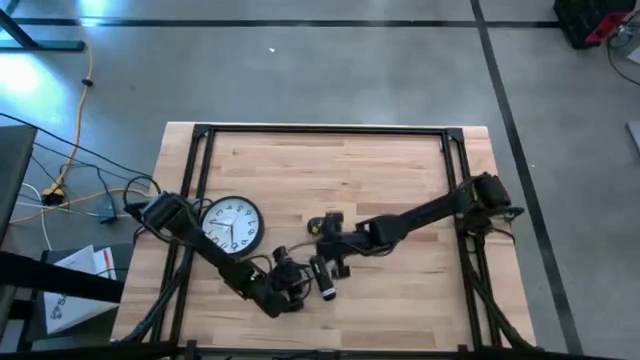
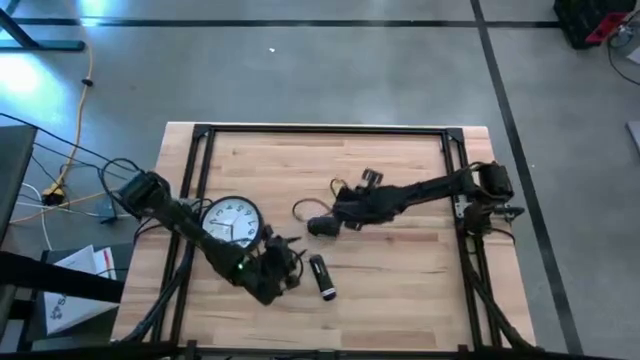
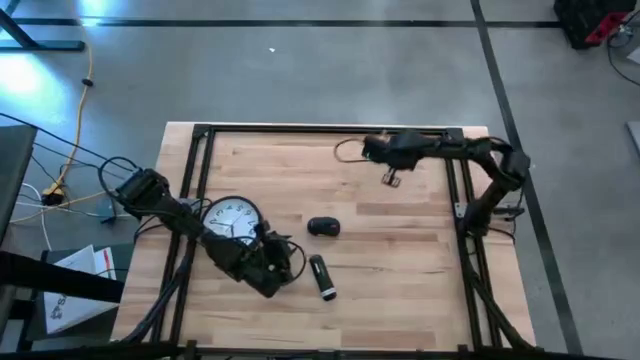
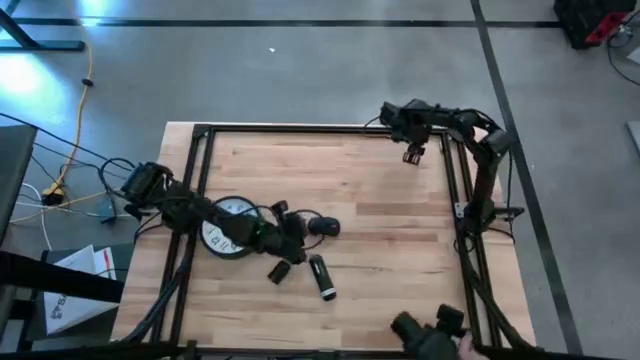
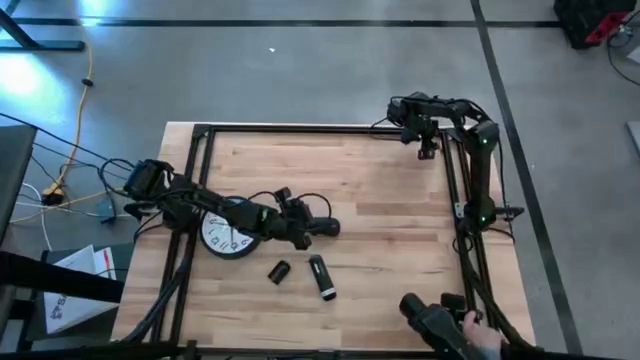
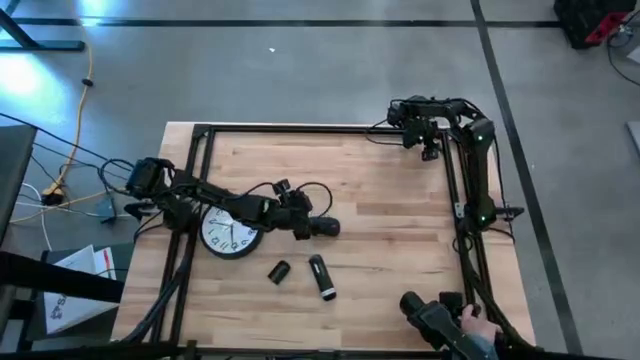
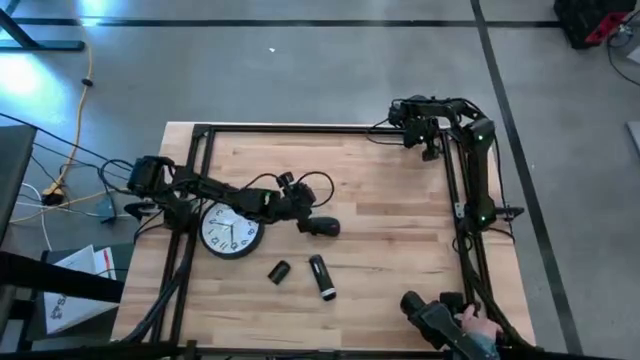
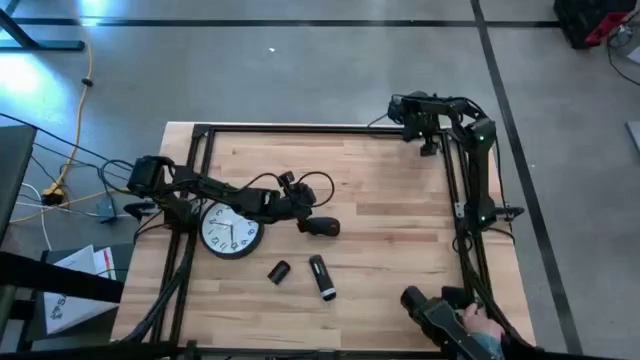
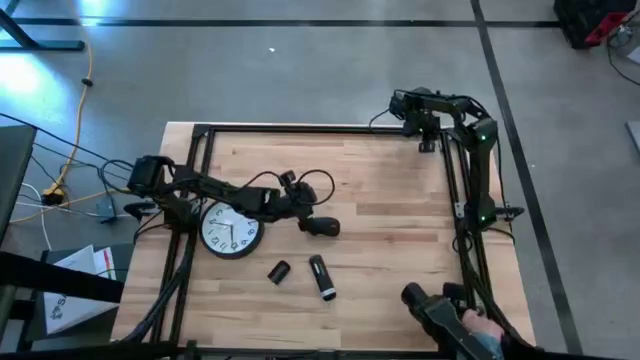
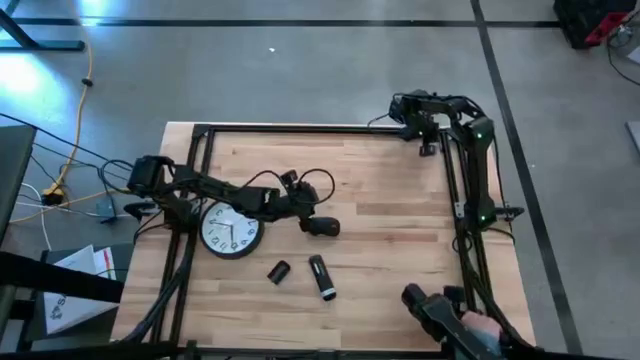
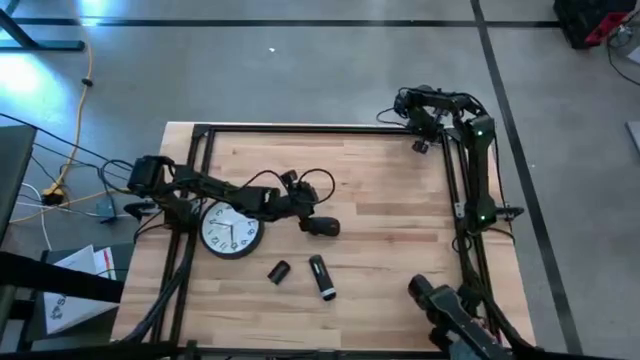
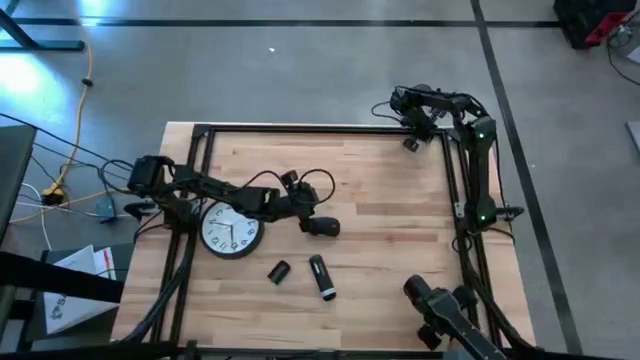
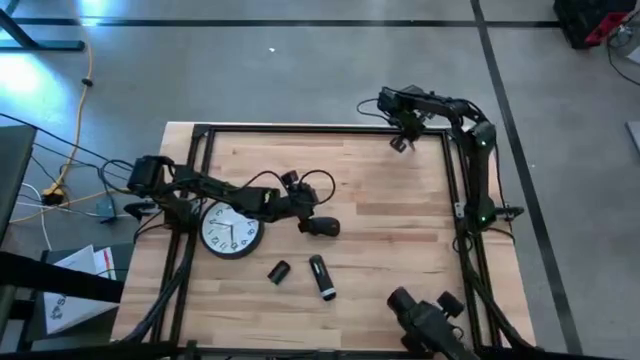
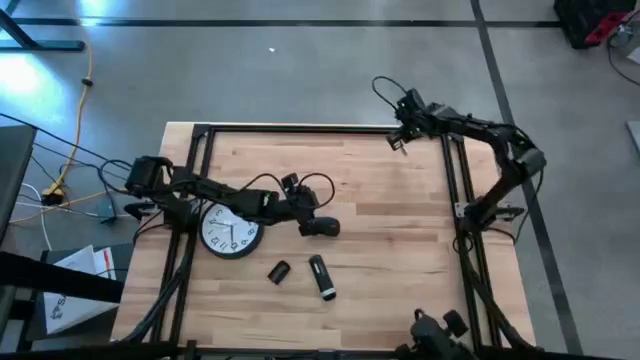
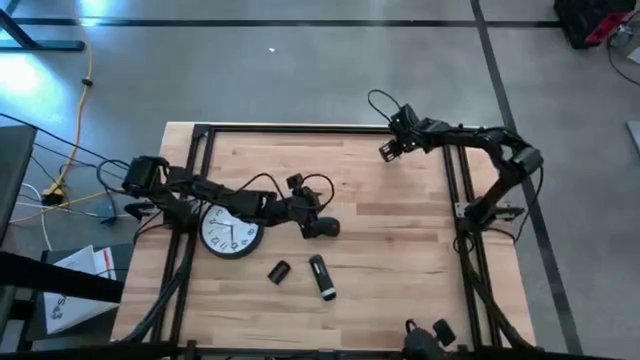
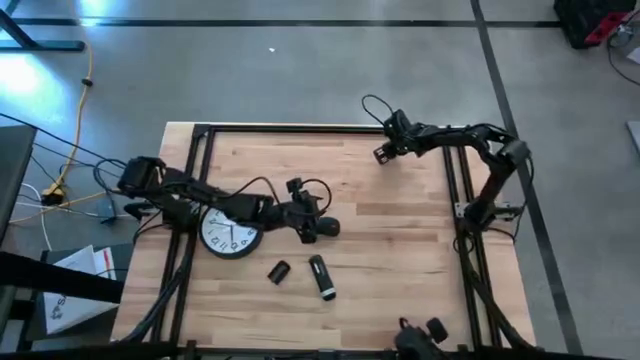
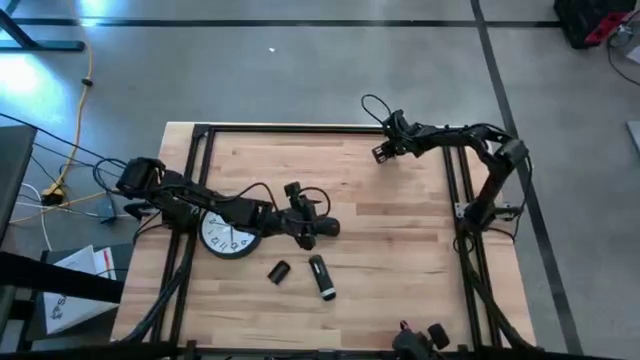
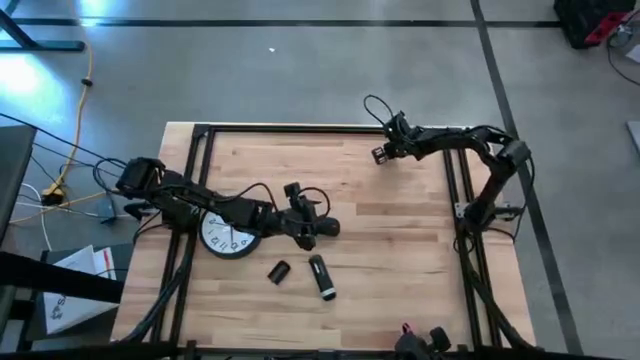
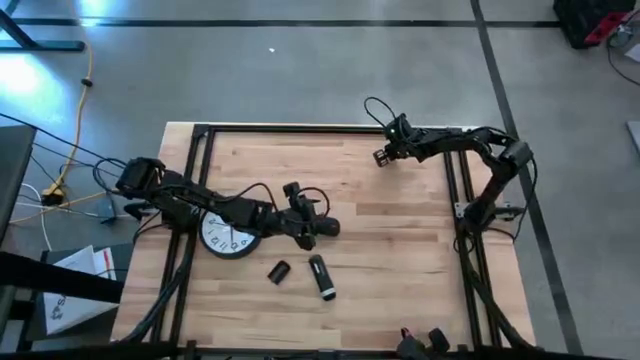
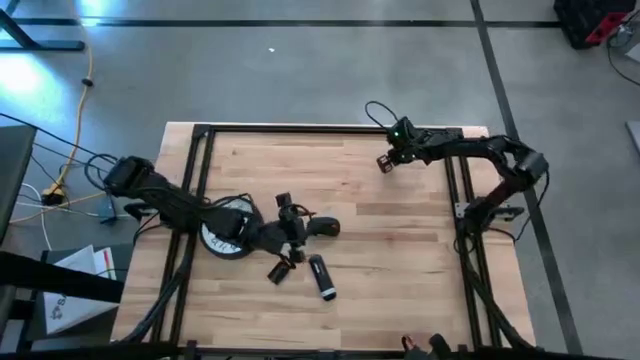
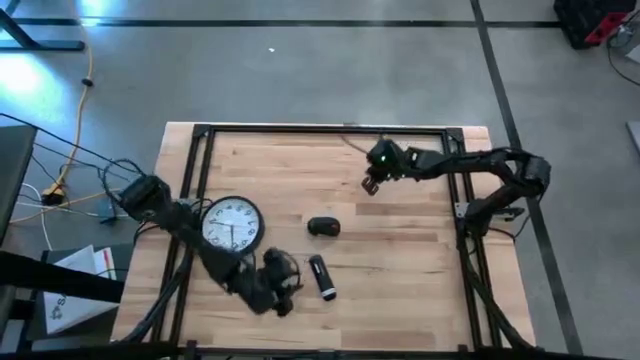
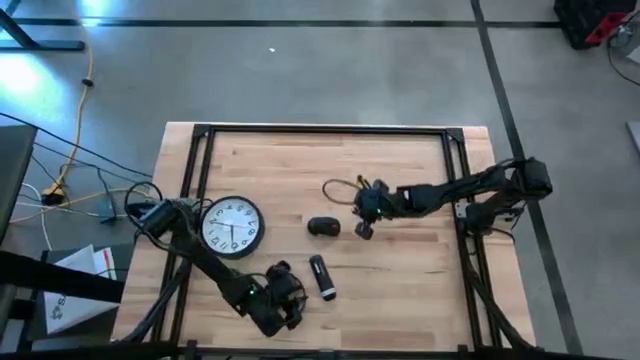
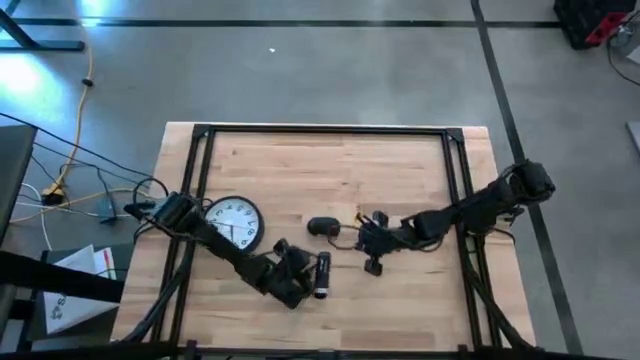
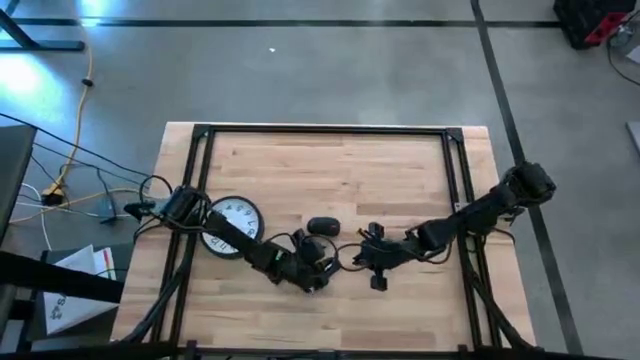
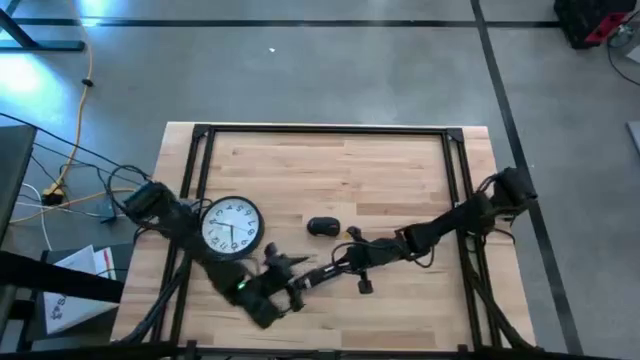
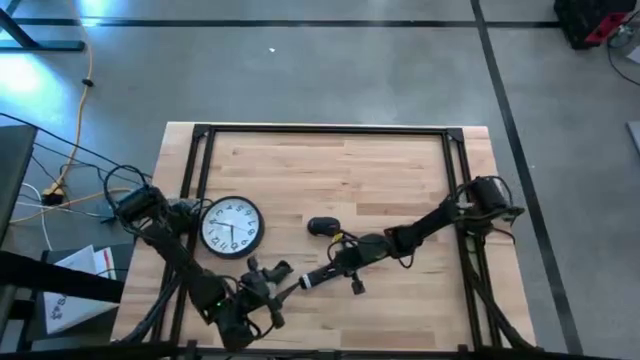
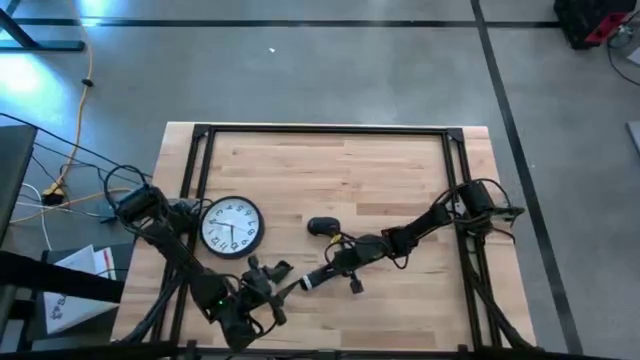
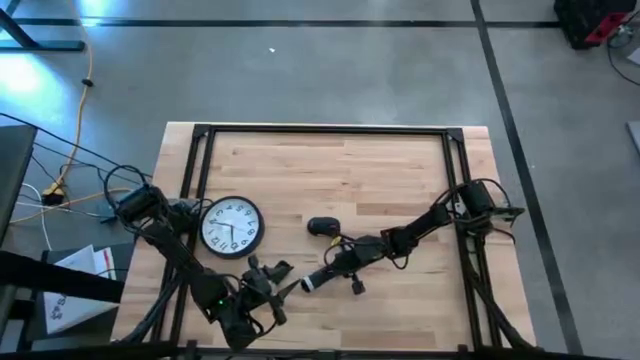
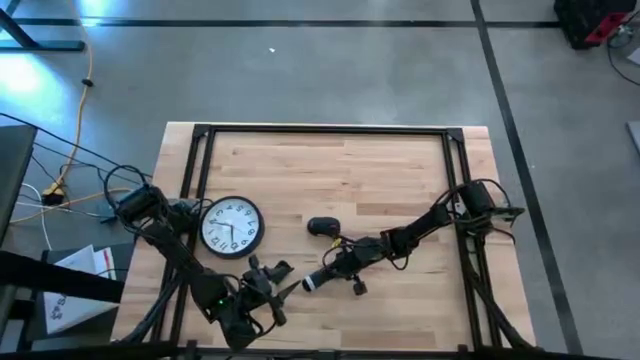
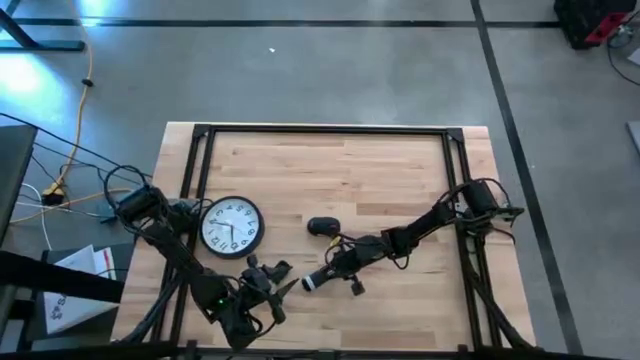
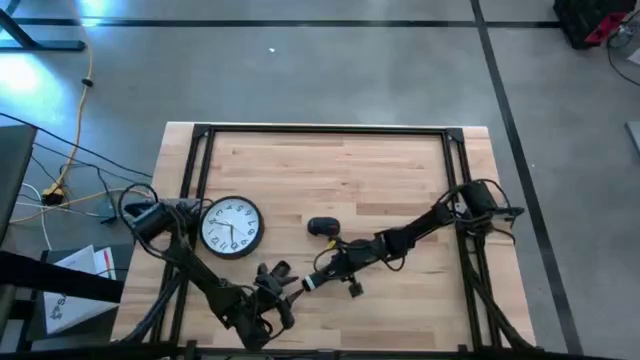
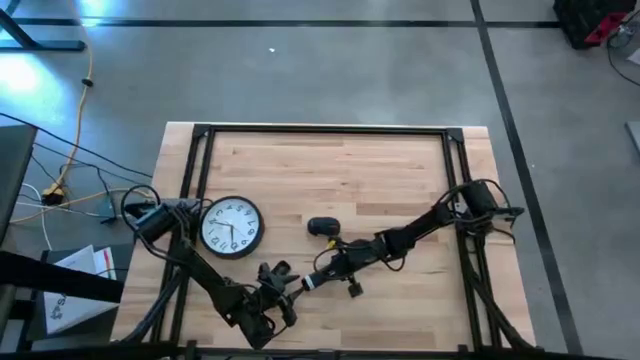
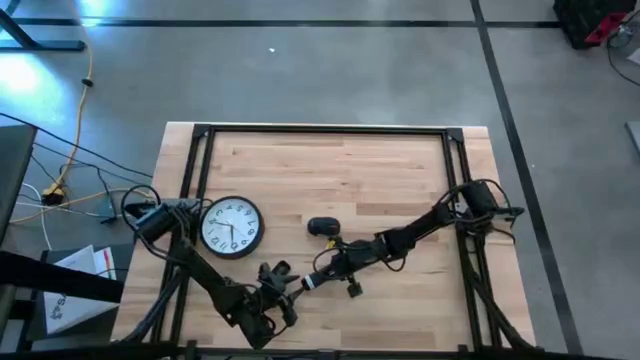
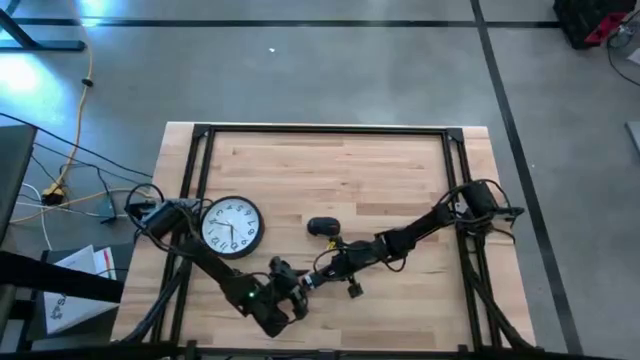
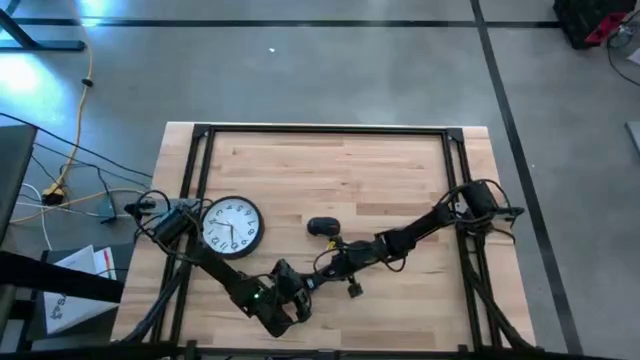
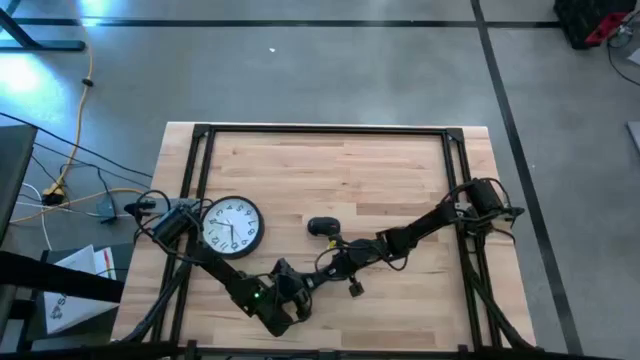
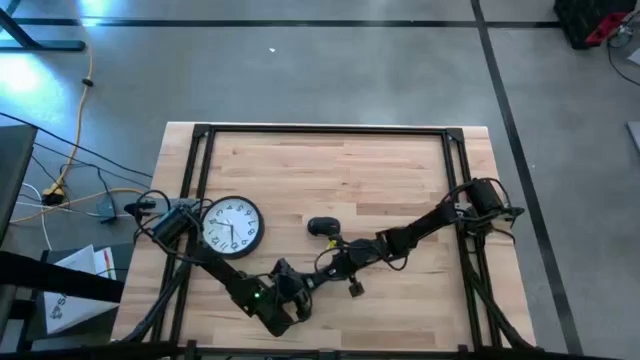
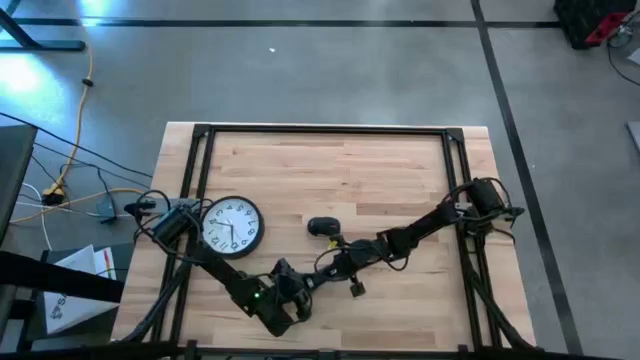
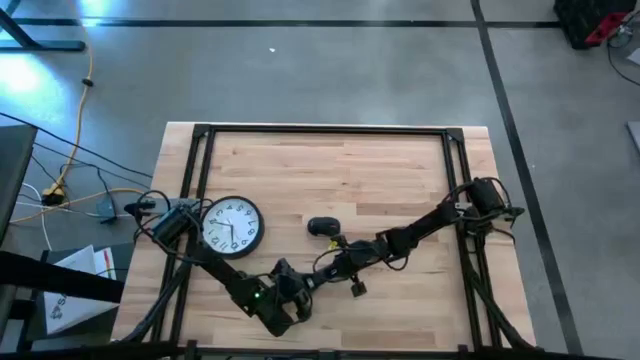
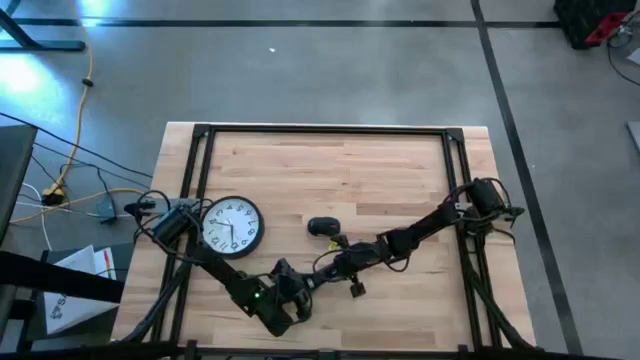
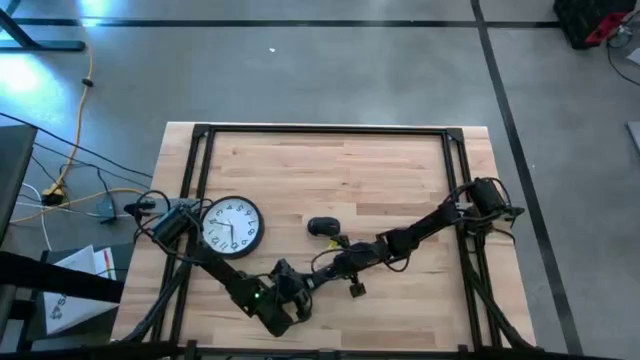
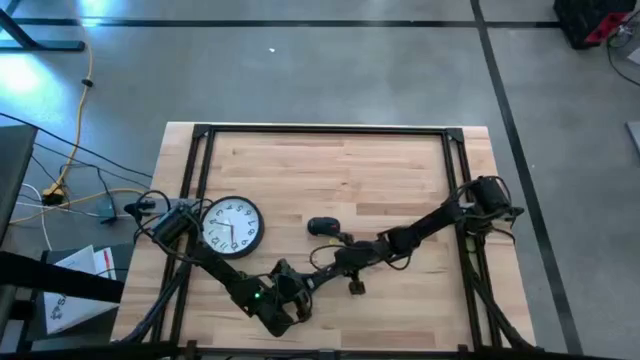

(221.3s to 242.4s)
Task: Insert battery
Insert the silver battery into the black remote

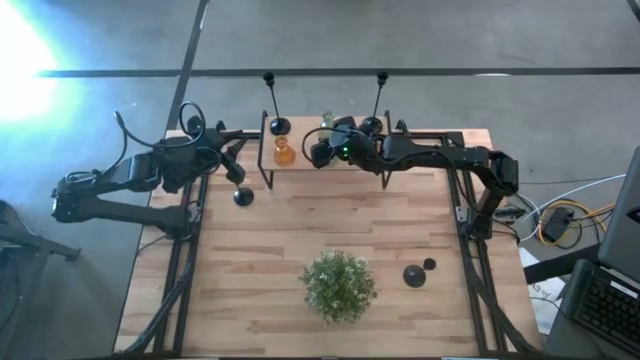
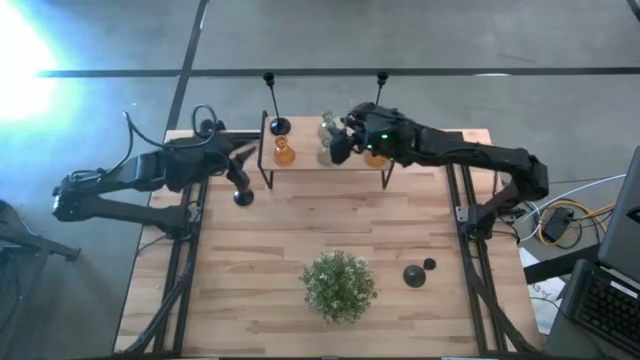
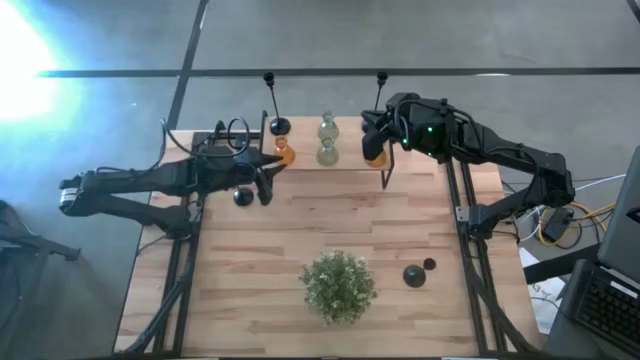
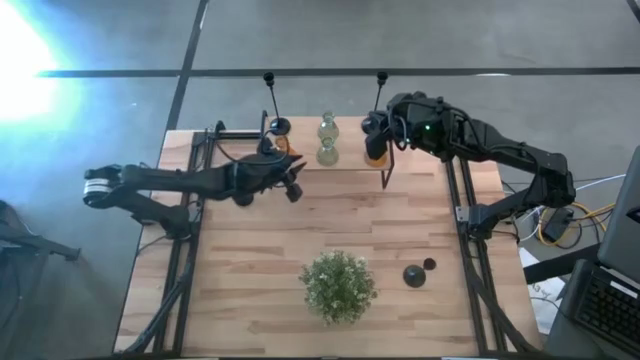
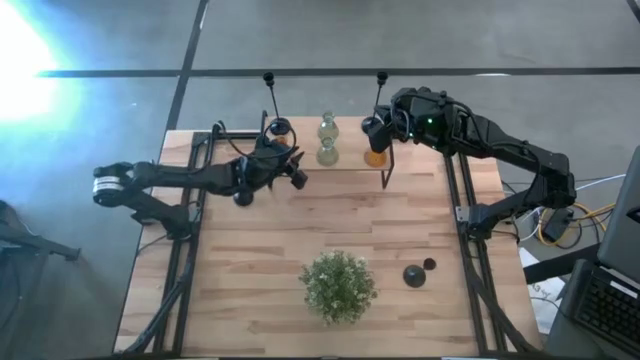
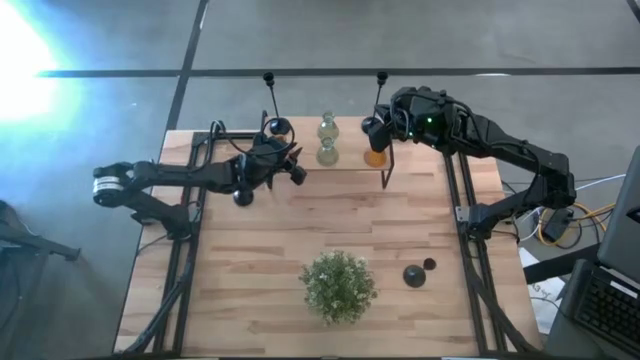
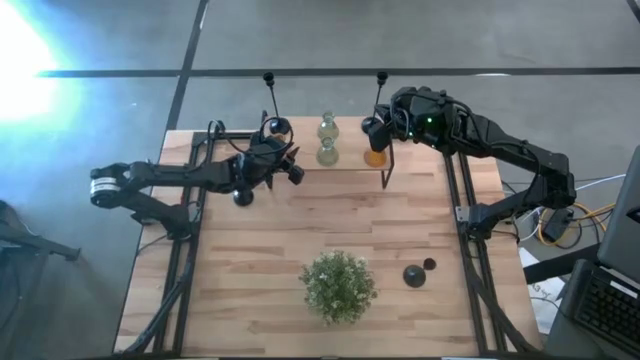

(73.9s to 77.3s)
Task: Pick & Place candle stick holders
Adjust the orange glass candle holder
